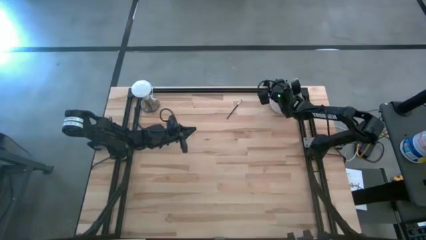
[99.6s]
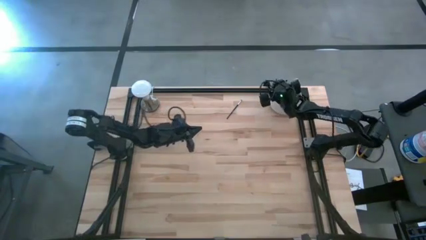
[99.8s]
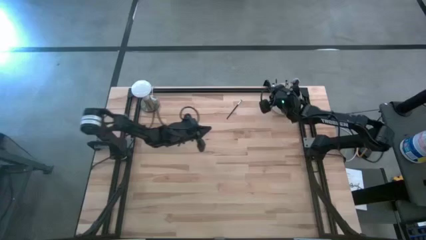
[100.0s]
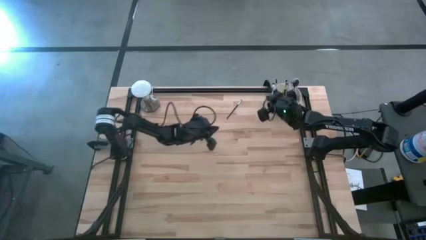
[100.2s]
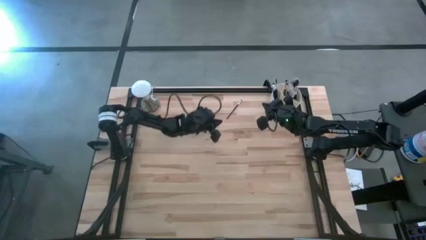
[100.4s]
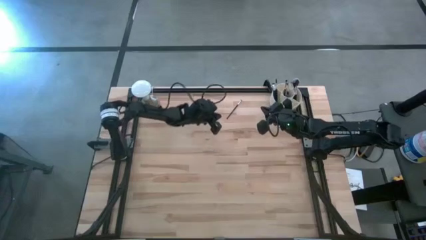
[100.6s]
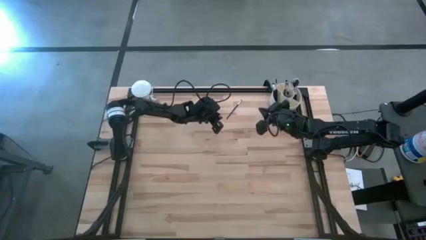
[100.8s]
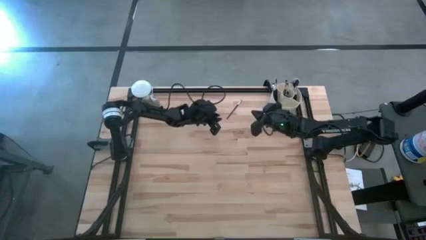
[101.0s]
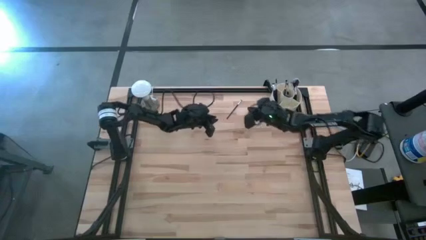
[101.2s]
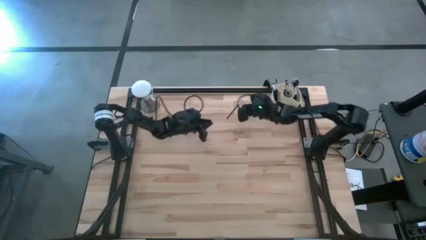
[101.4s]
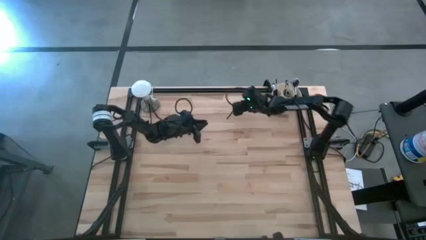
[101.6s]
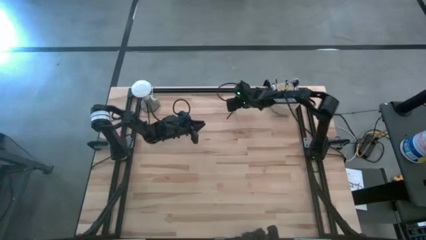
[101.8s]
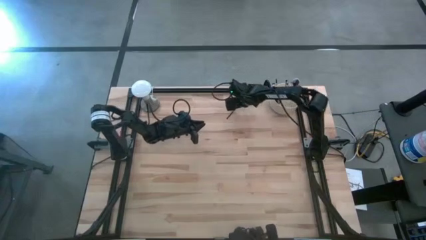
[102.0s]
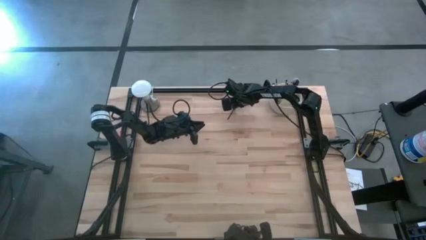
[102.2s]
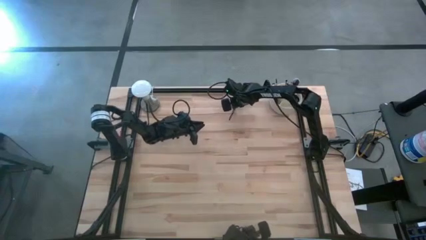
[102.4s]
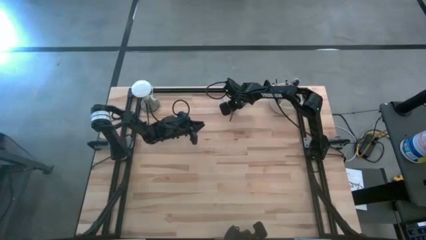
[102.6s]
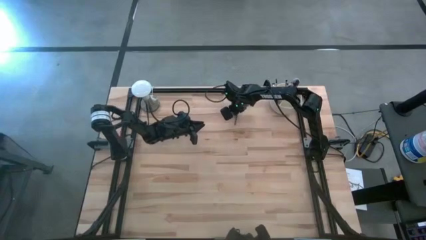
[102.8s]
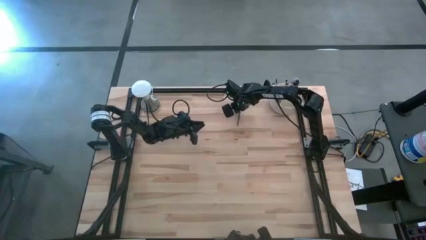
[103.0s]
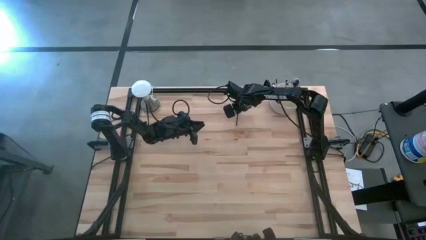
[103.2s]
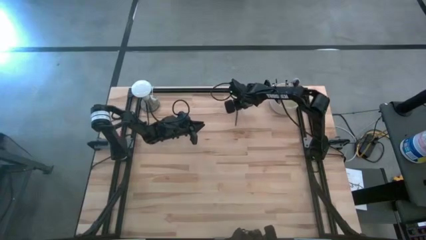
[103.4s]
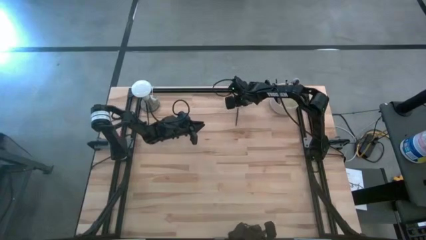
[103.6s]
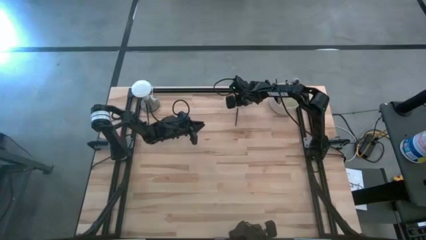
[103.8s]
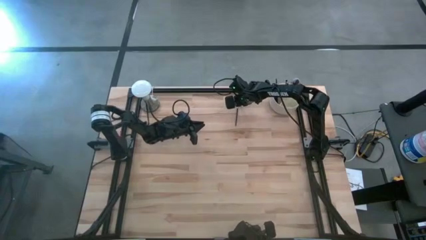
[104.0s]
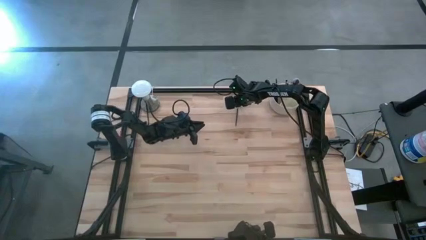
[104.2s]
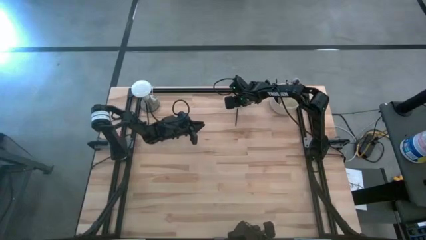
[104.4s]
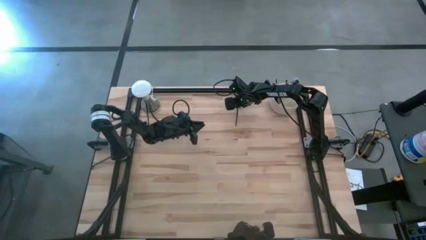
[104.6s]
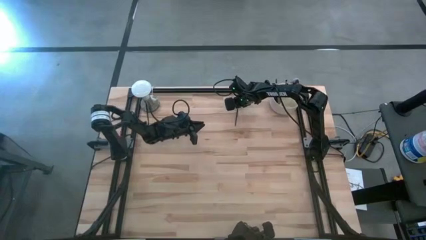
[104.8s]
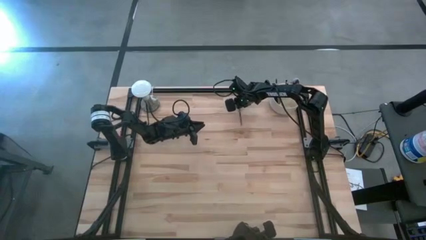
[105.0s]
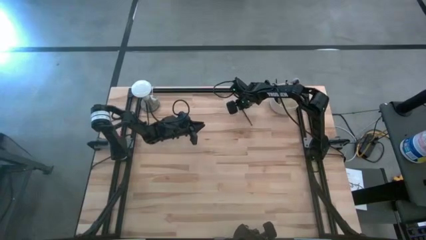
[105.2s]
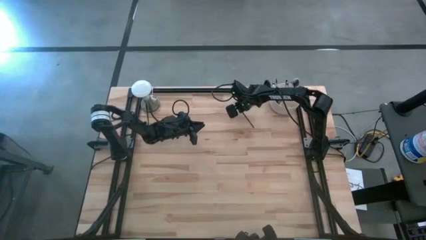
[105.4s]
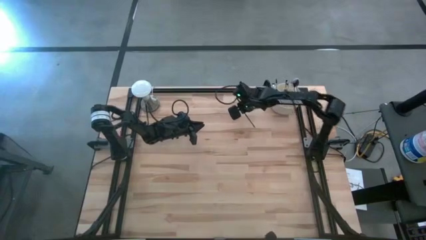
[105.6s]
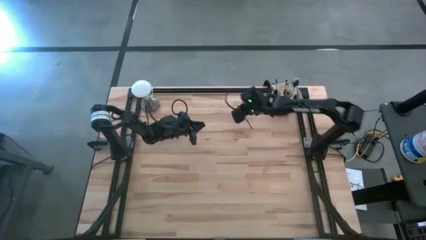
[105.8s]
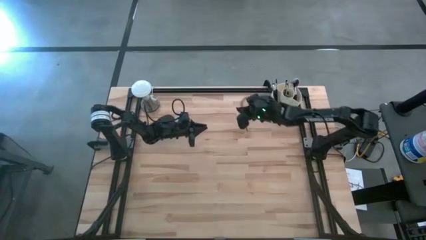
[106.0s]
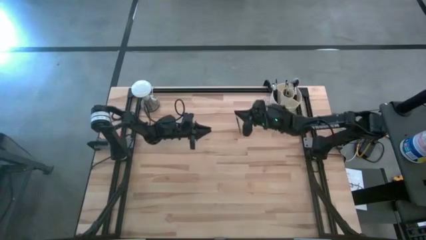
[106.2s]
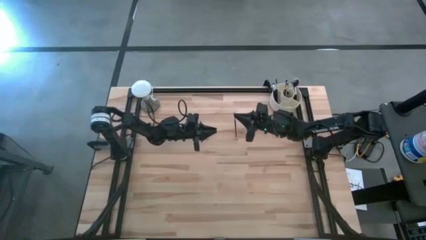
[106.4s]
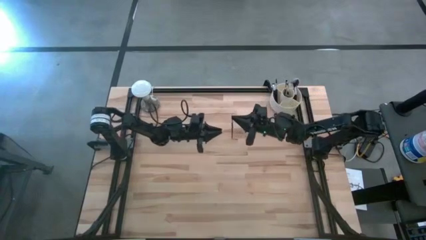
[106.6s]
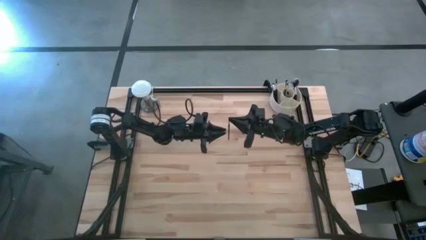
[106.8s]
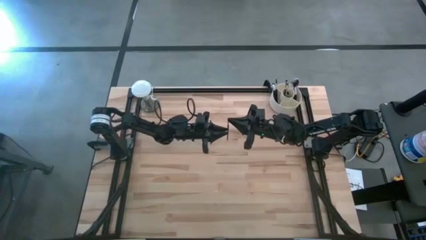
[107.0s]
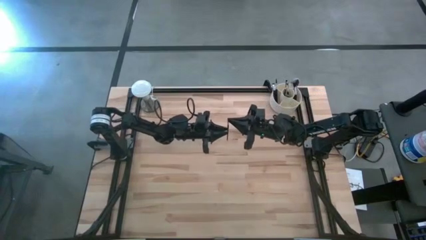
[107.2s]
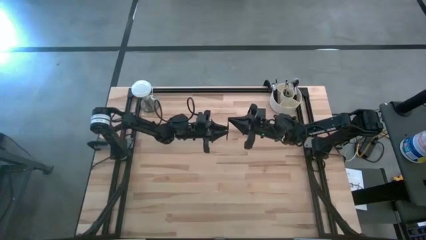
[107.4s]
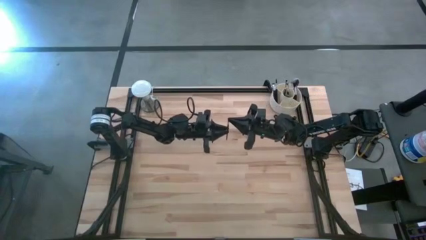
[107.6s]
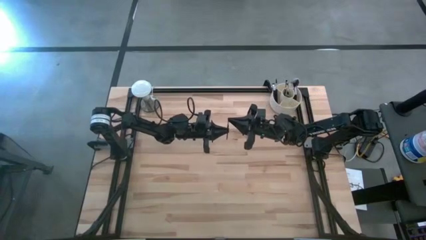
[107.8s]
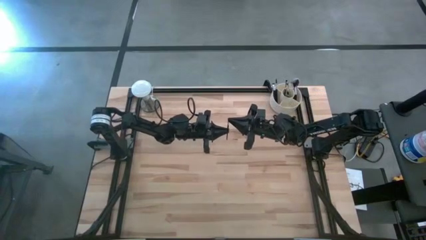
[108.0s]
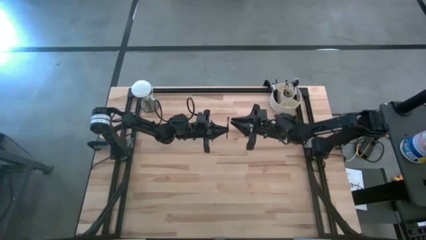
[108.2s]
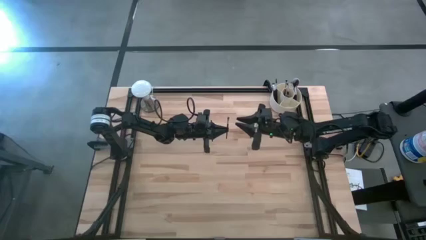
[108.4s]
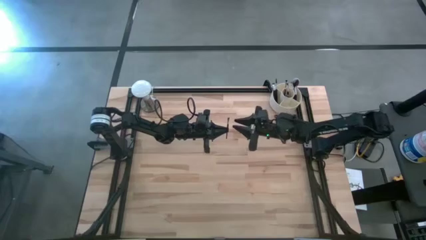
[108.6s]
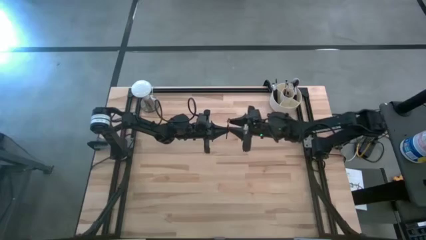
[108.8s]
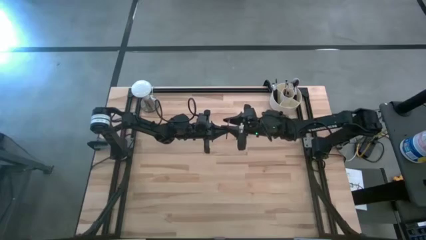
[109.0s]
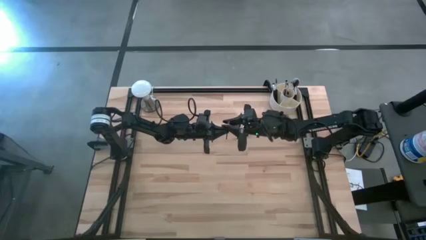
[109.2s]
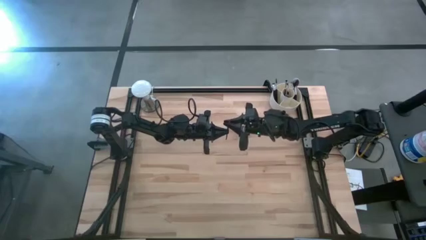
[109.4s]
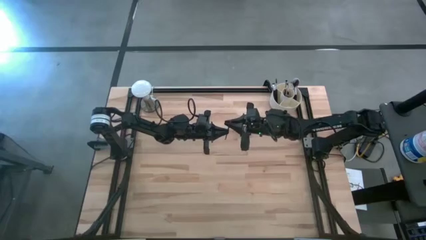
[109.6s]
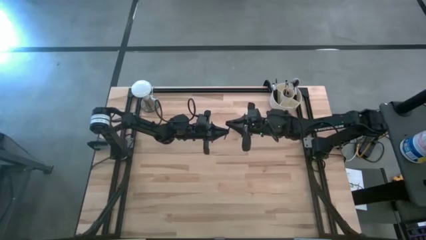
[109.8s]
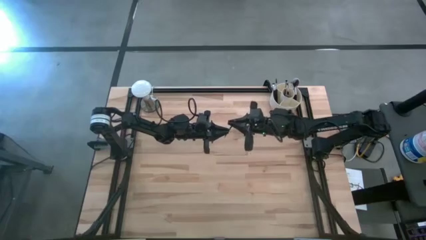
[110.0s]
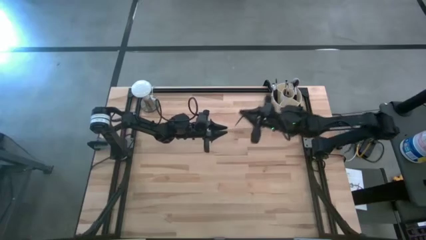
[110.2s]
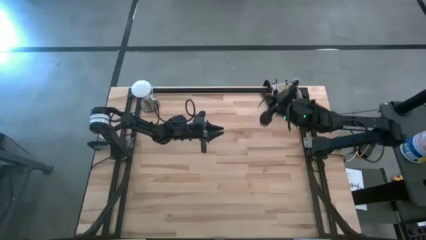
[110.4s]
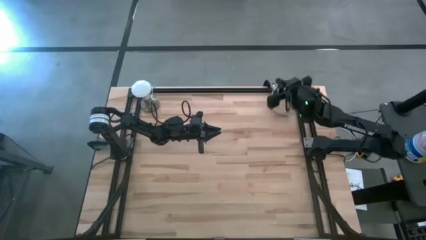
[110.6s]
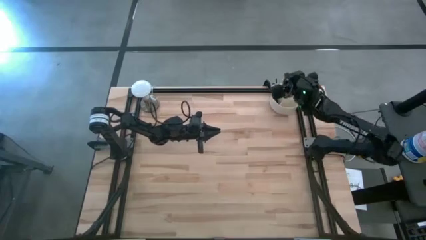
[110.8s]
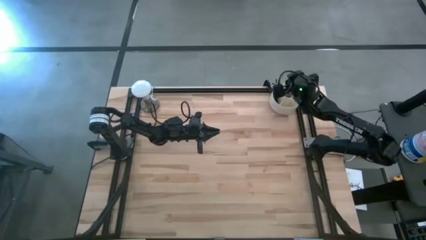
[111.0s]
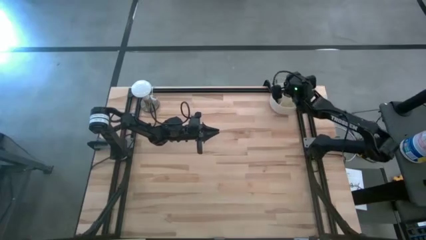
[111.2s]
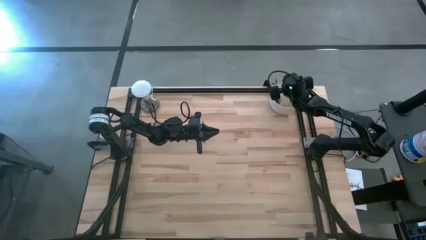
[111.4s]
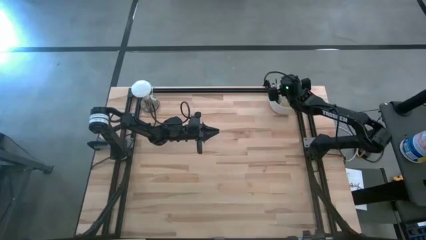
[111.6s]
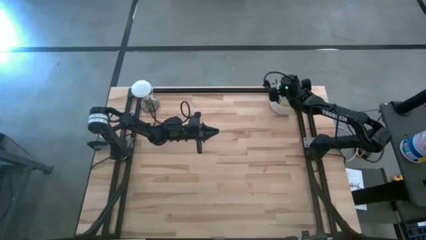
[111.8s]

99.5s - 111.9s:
Task: Pick & Place Makeup Brushes
Put the black blush brush into the white makeup holder
